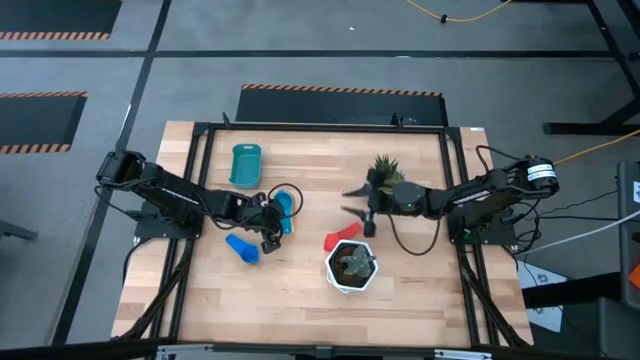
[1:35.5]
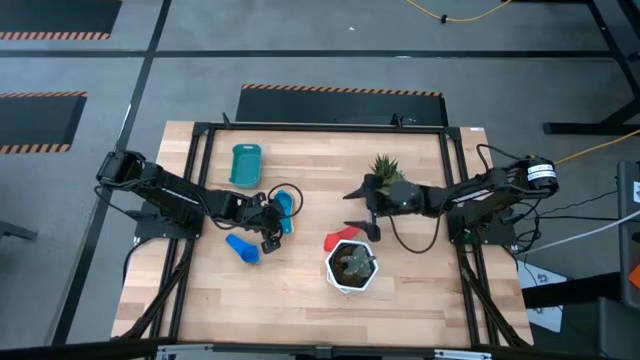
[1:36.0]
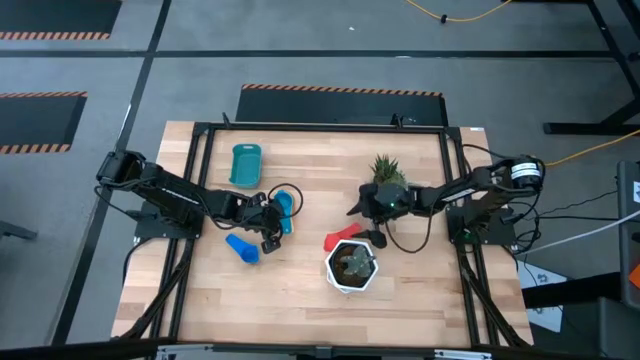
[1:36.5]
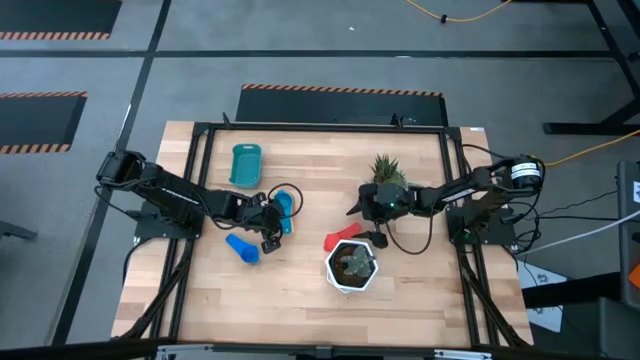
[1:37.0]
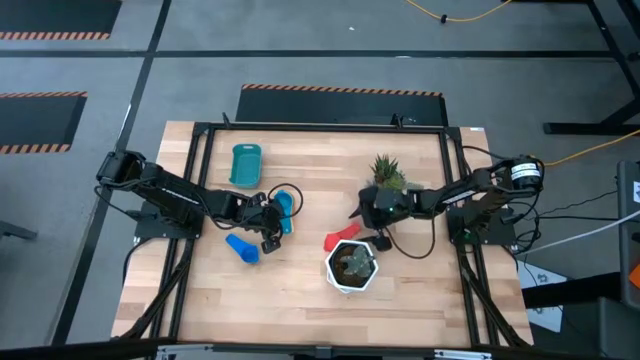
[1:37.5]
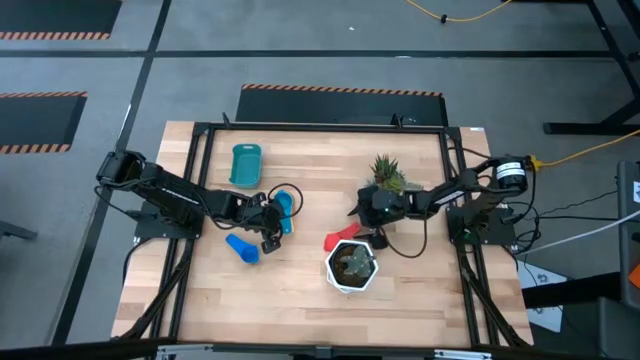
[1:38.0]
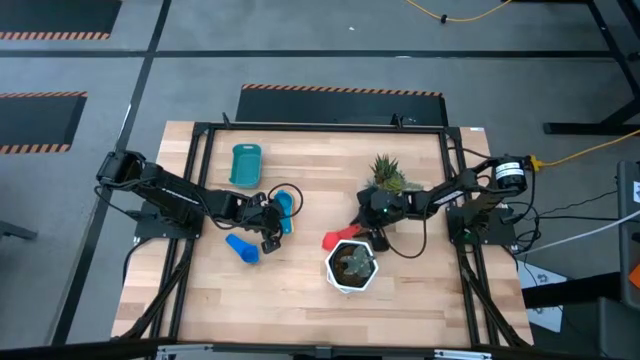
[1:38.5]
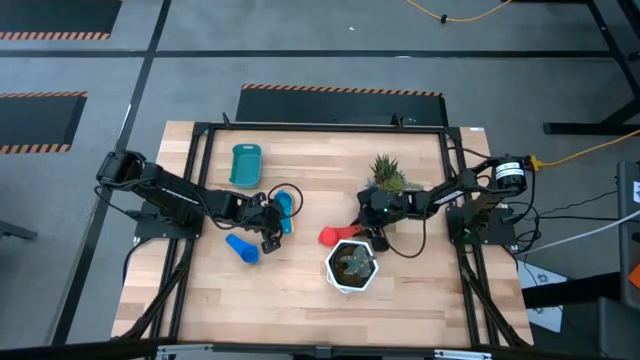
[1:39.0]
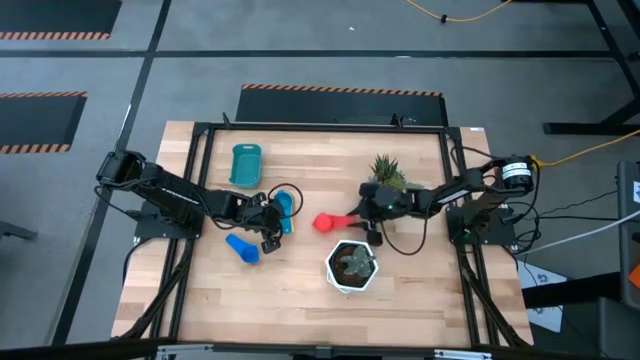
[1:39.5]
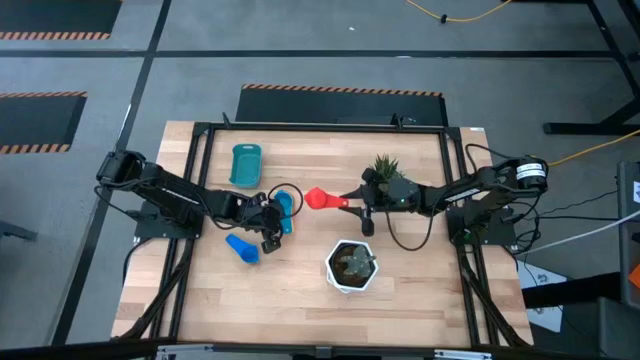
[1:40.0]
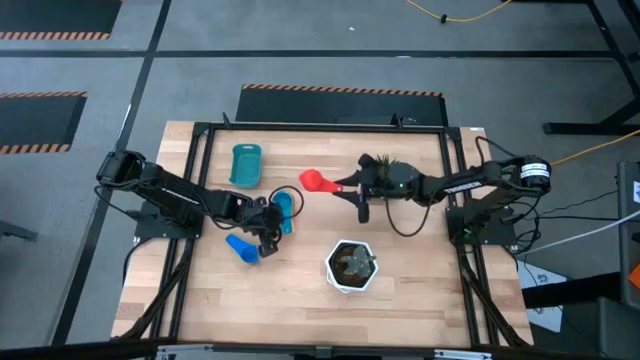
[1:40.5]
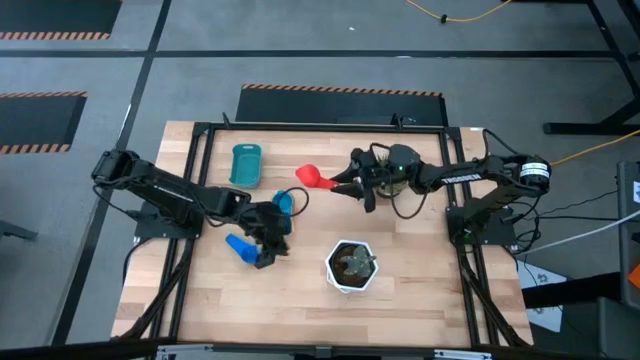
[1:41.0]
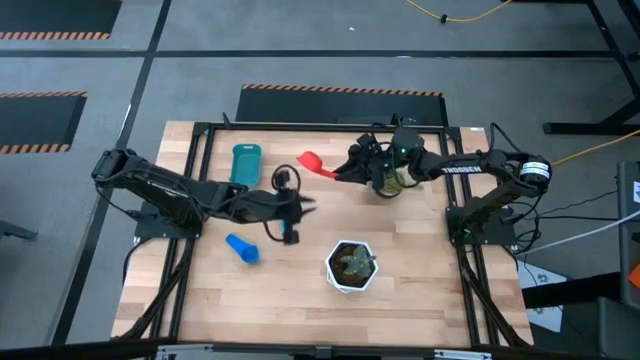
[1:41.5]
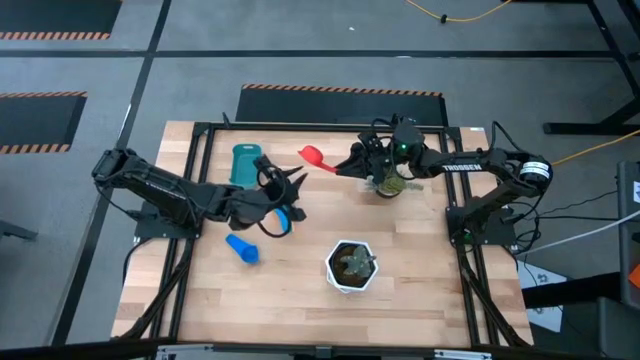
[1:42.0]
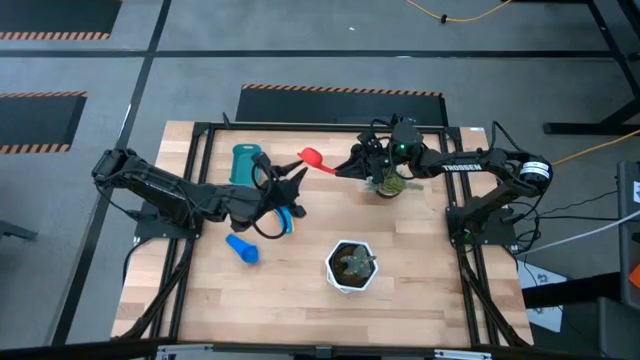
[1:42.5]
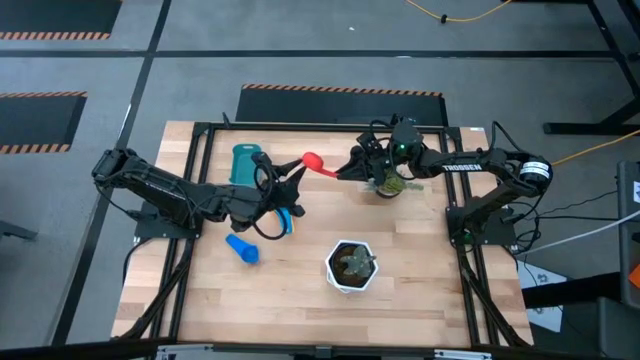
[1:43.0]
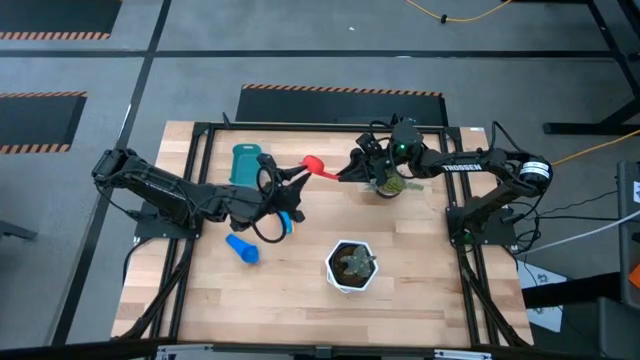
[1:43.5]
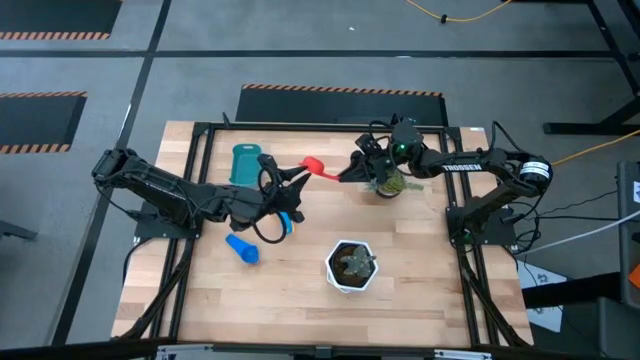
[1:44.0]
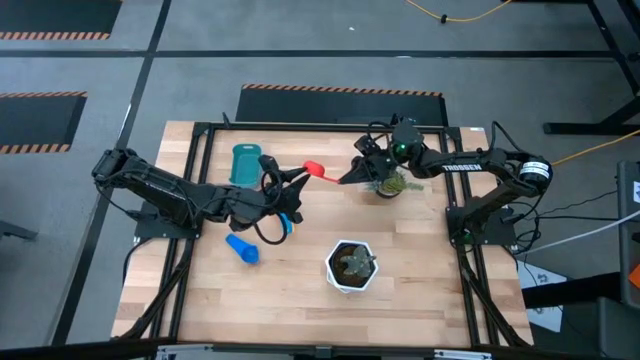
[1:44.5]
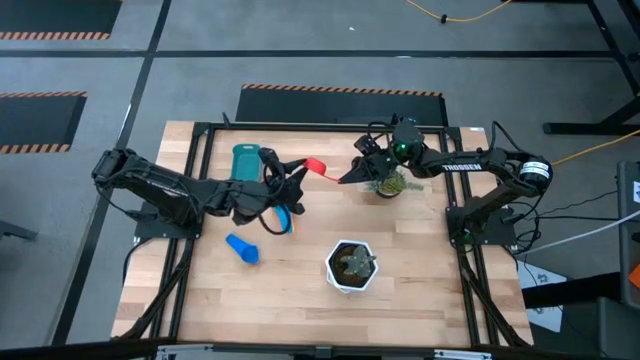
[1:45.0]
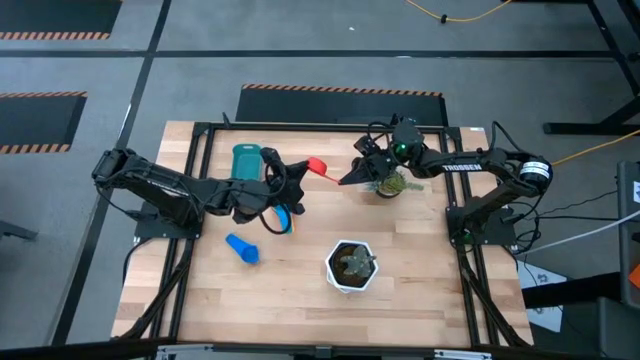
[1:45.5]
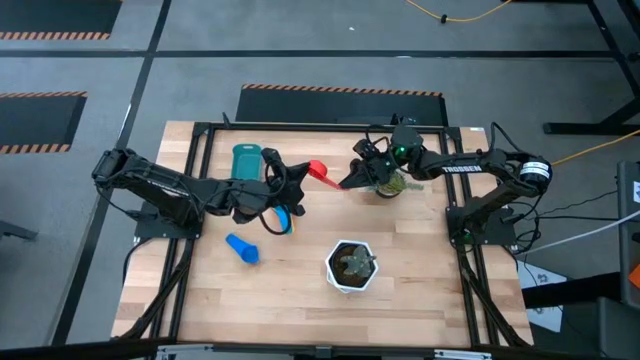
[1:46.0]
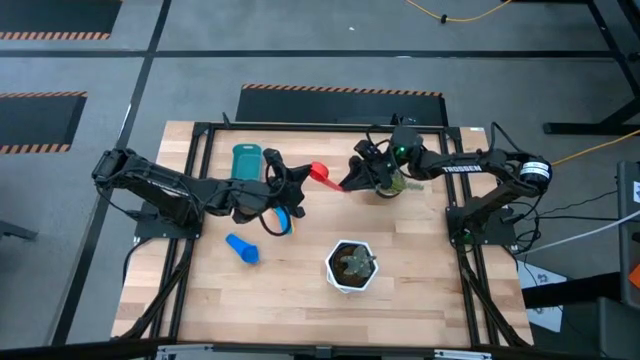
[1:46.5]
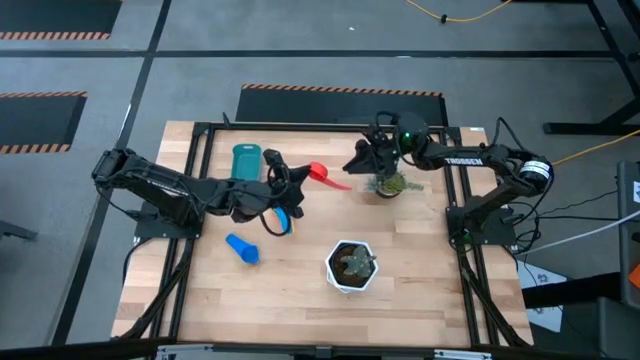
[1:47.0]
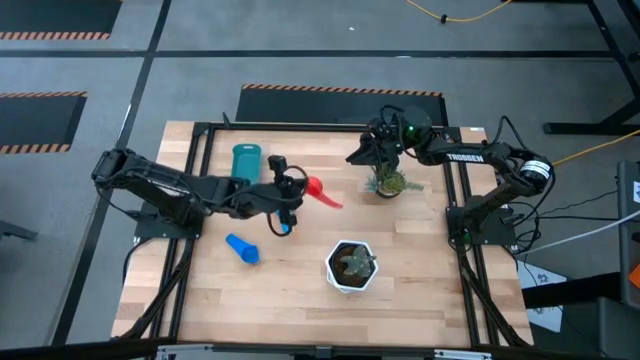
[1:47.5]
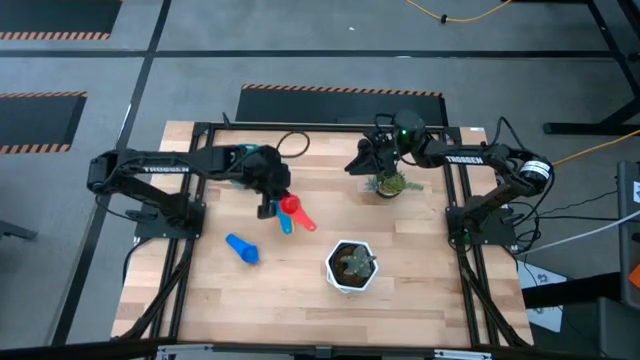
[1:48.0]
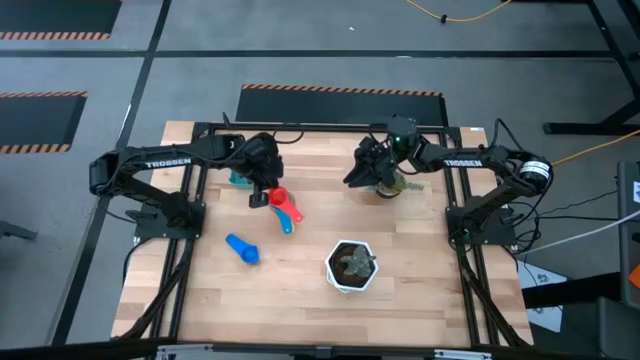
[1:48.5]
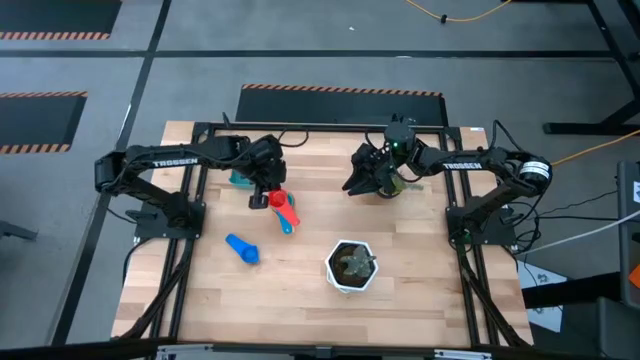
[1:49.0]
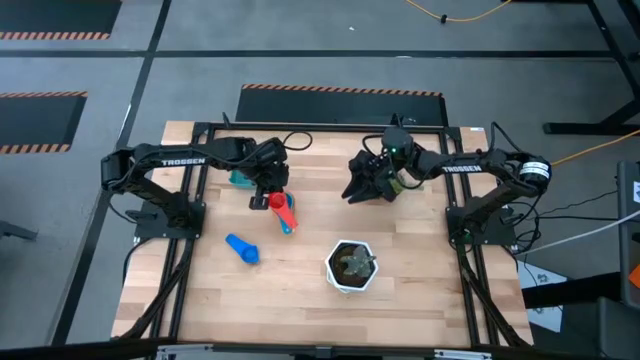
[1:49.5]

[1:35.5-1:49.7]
Task: Nest measuring cups in basket
Stack the red measuring cup into the light blue measuring cup

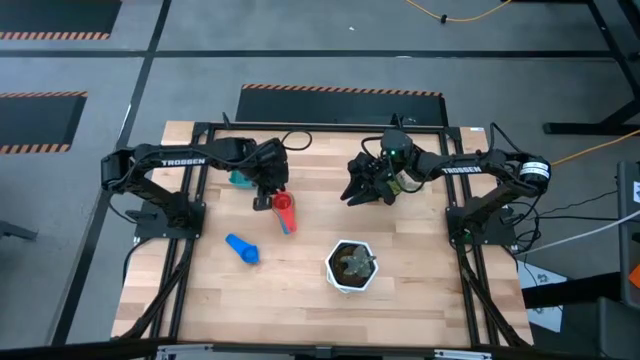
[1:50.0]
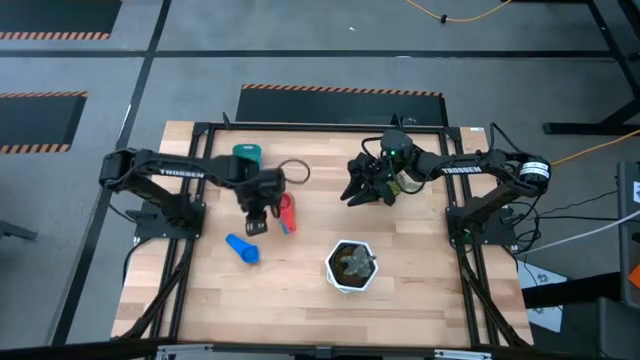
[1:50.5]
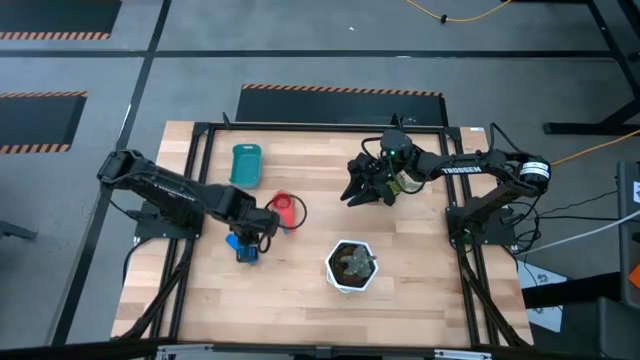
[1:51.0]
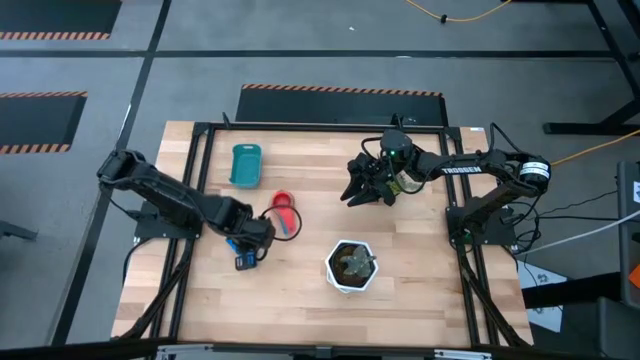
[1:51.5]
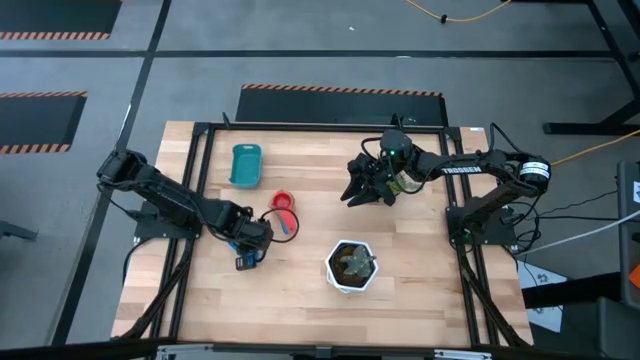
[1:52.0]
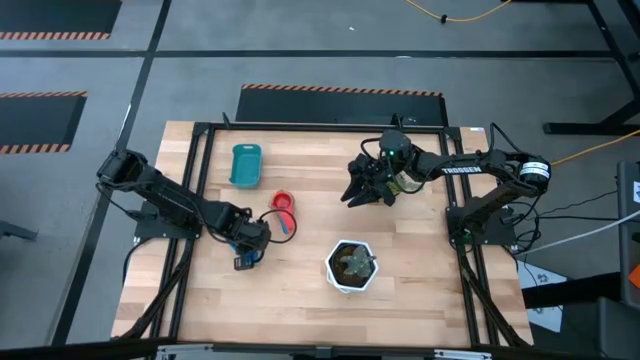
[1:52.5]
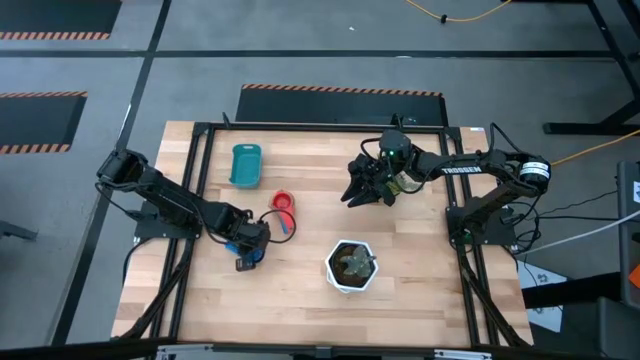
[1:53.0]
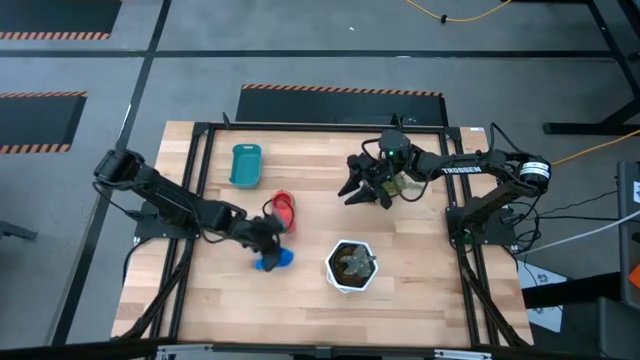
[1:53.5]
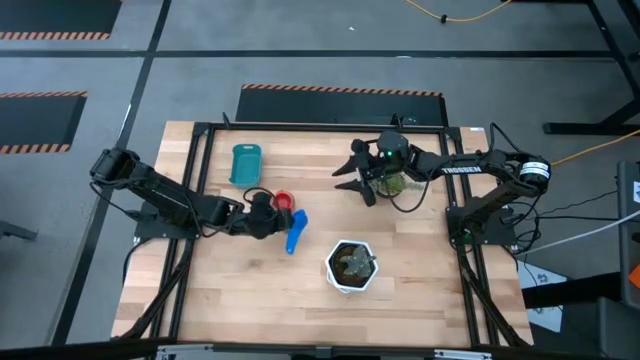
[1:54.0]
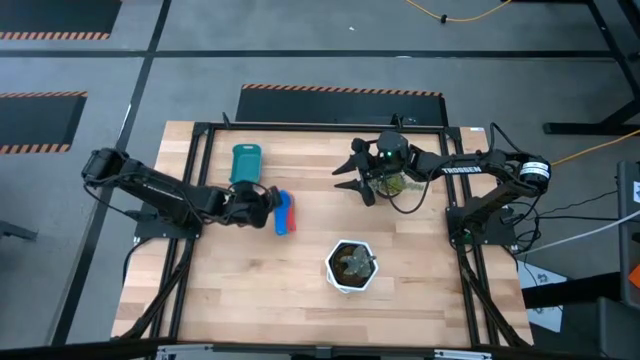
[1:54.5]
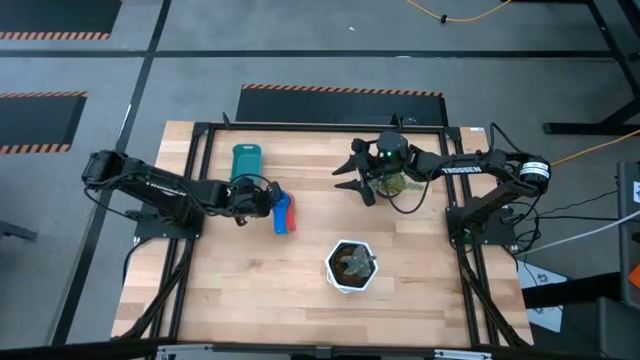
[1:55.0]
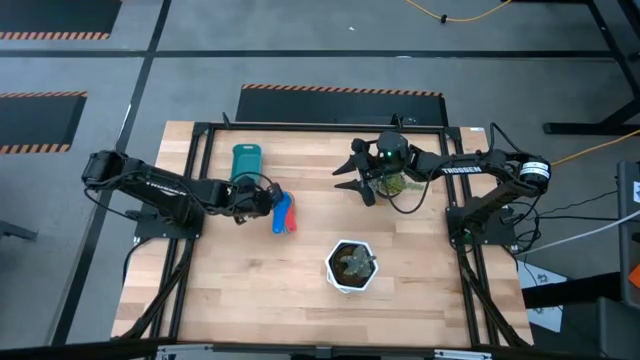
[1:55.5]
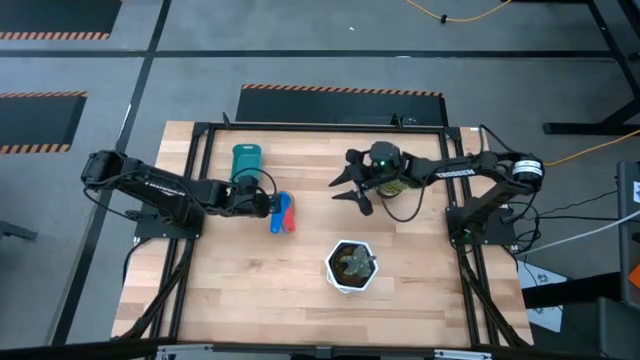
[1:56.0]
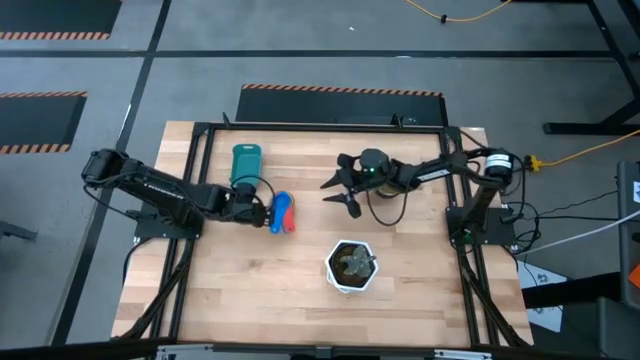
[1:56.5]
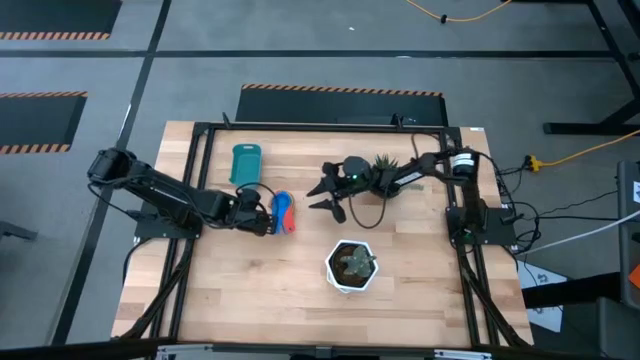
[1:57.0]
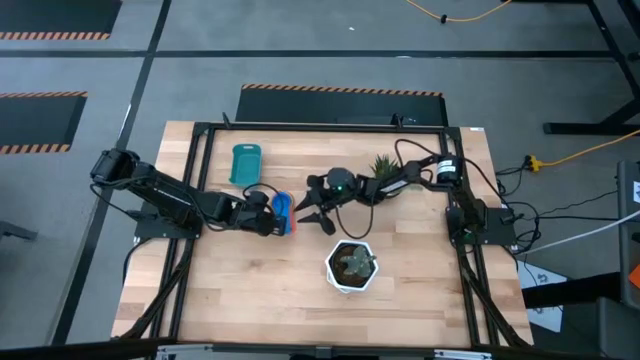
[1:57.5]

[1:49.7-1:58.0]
Stack the blue measuring cup into the red measuring cup
